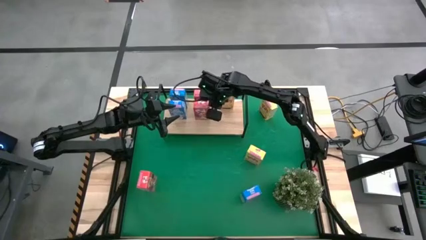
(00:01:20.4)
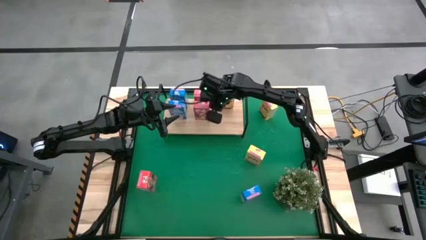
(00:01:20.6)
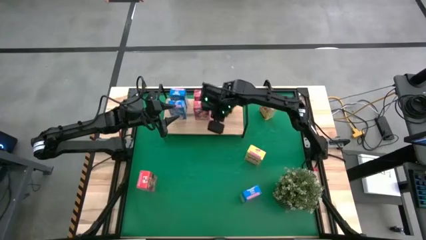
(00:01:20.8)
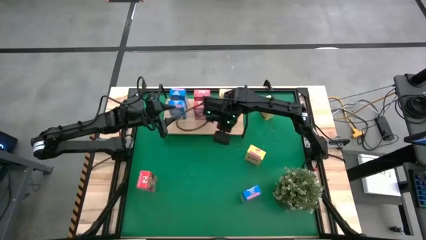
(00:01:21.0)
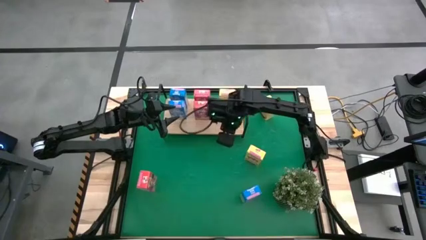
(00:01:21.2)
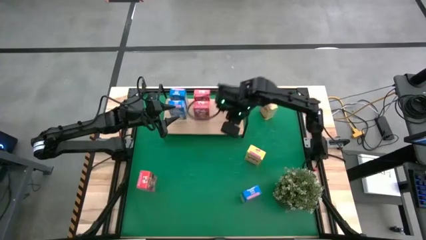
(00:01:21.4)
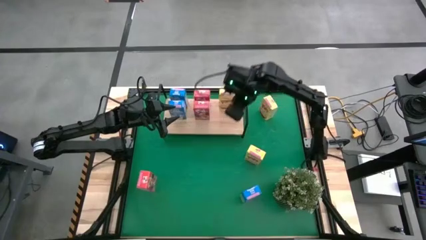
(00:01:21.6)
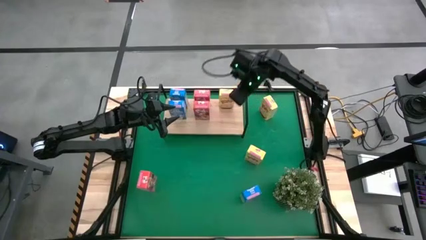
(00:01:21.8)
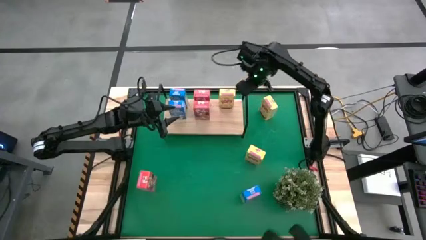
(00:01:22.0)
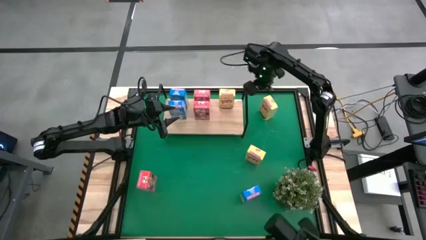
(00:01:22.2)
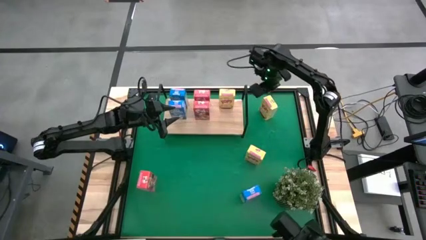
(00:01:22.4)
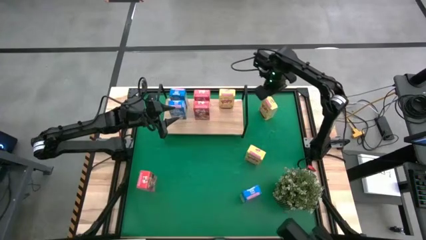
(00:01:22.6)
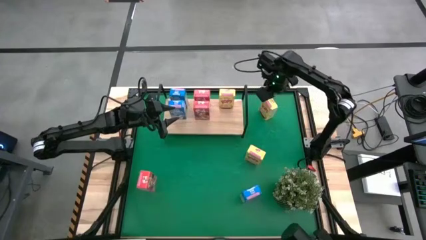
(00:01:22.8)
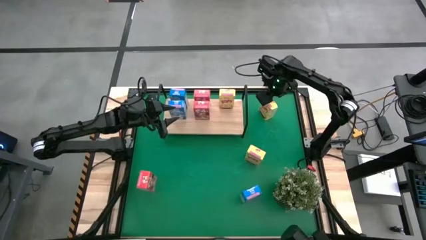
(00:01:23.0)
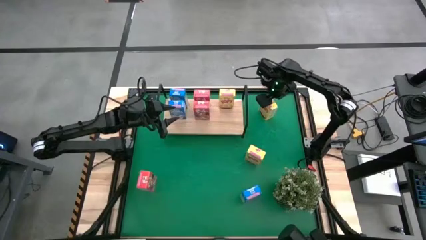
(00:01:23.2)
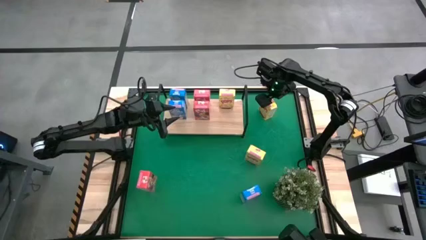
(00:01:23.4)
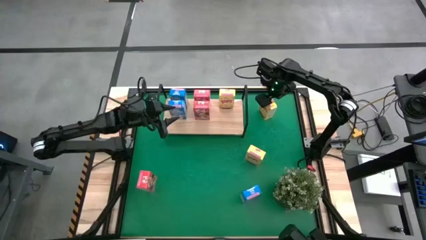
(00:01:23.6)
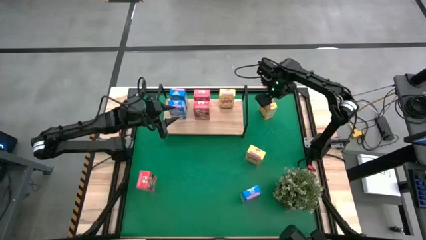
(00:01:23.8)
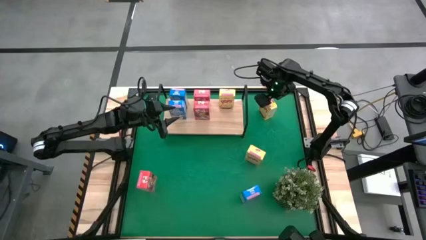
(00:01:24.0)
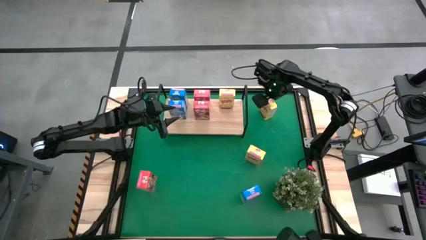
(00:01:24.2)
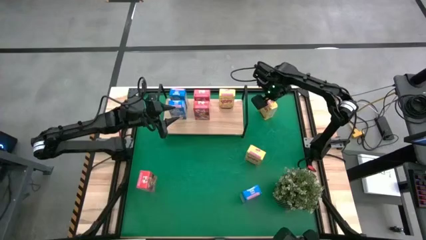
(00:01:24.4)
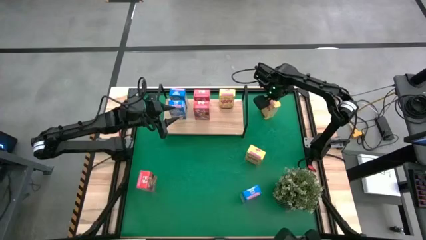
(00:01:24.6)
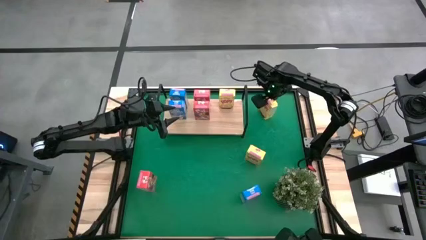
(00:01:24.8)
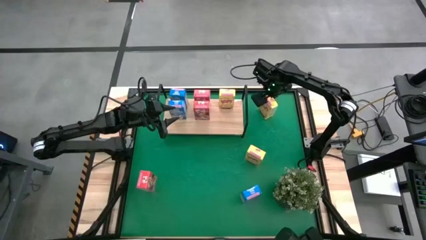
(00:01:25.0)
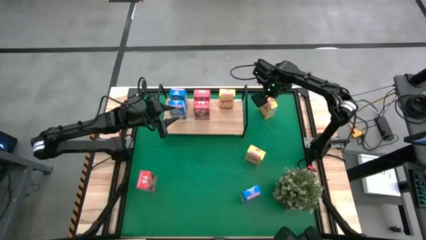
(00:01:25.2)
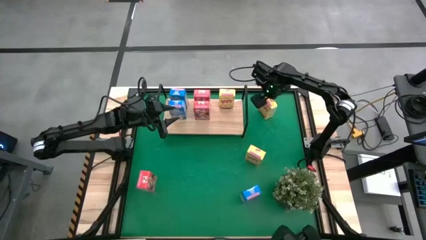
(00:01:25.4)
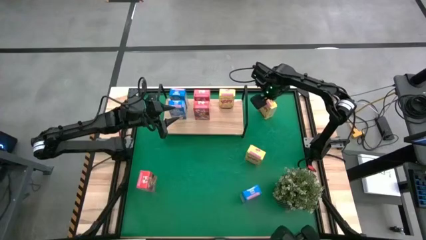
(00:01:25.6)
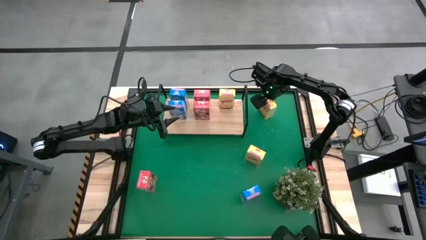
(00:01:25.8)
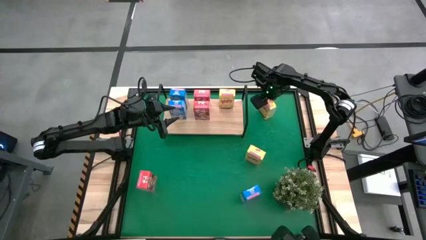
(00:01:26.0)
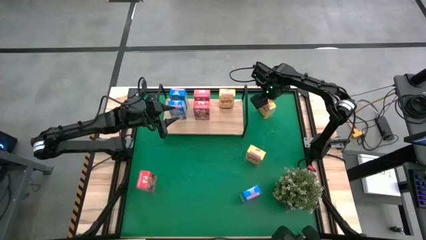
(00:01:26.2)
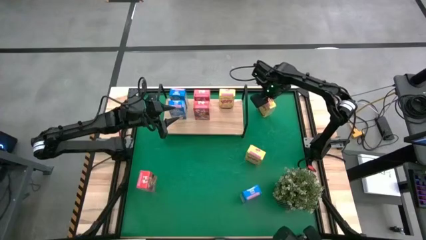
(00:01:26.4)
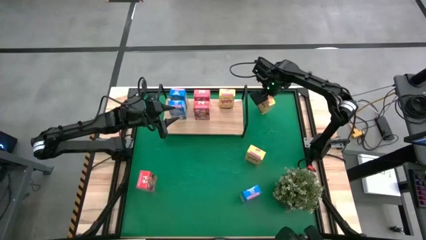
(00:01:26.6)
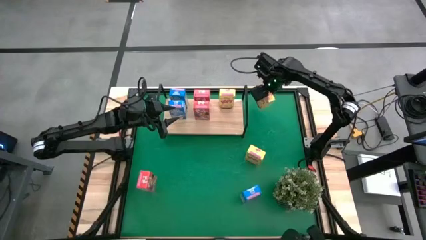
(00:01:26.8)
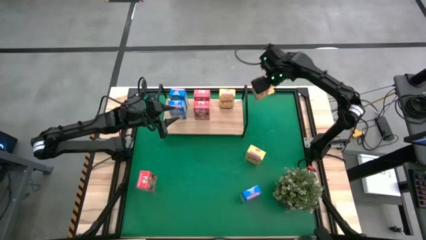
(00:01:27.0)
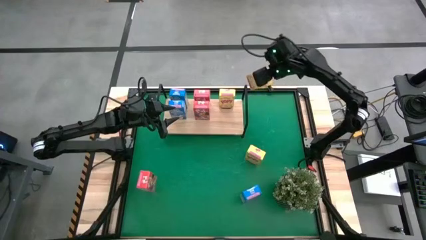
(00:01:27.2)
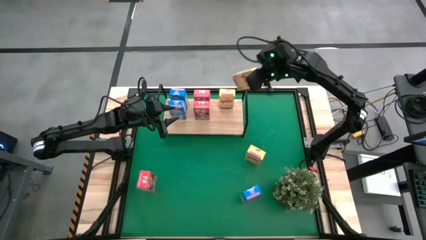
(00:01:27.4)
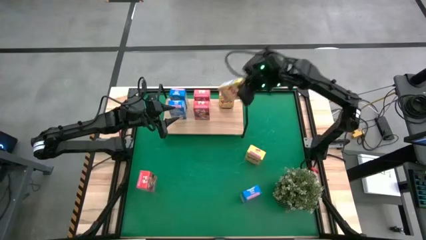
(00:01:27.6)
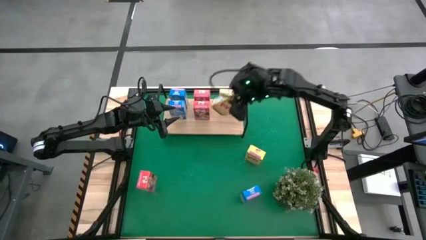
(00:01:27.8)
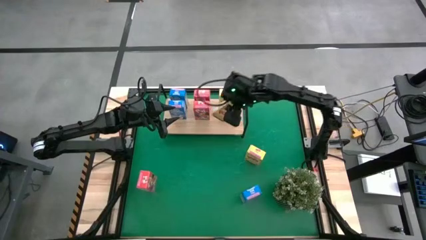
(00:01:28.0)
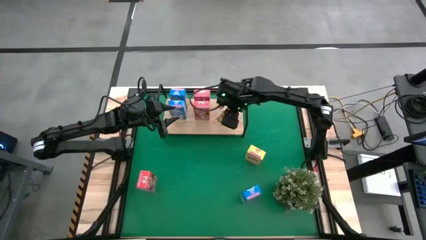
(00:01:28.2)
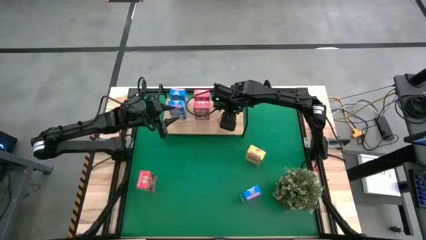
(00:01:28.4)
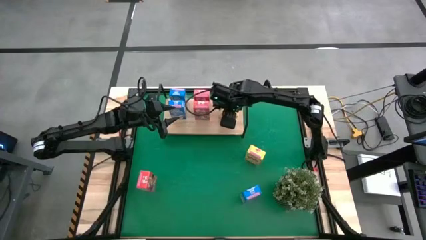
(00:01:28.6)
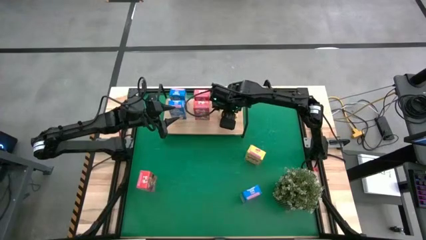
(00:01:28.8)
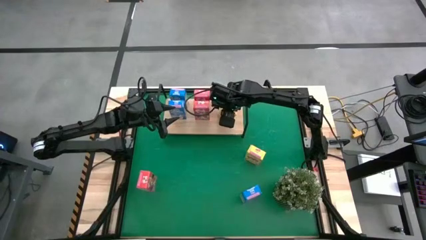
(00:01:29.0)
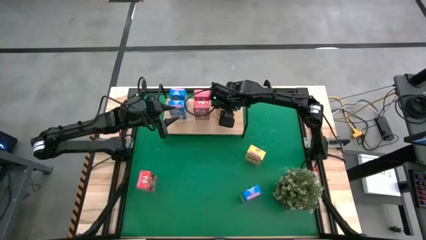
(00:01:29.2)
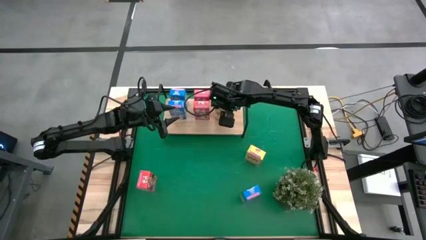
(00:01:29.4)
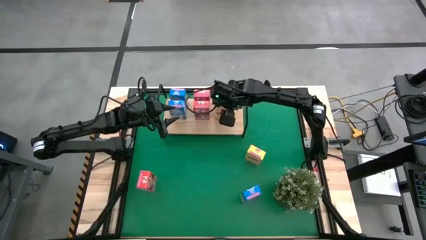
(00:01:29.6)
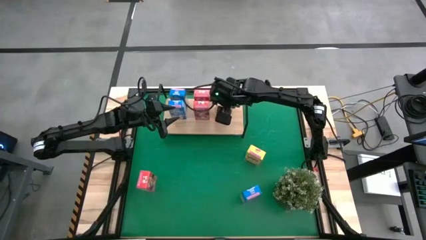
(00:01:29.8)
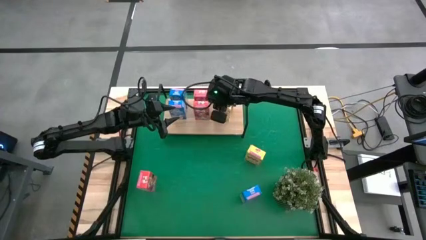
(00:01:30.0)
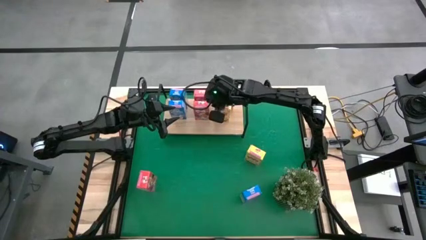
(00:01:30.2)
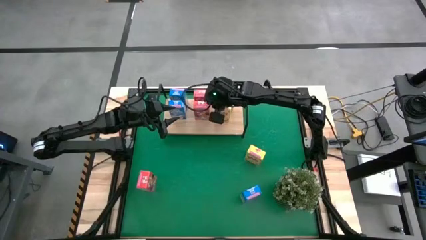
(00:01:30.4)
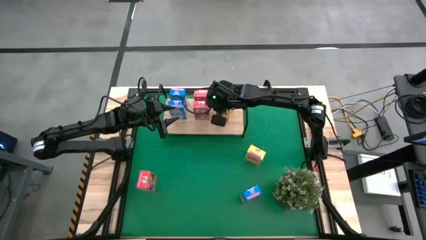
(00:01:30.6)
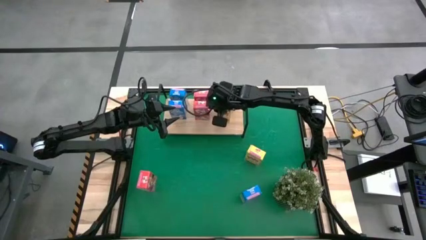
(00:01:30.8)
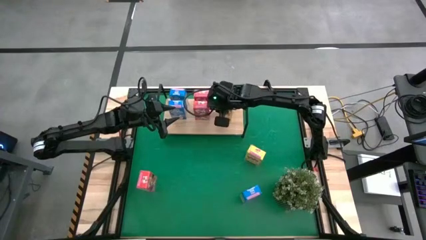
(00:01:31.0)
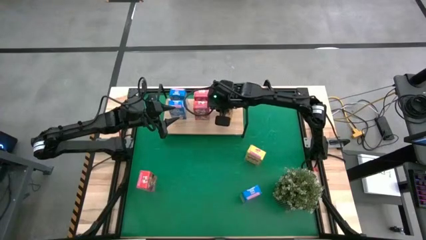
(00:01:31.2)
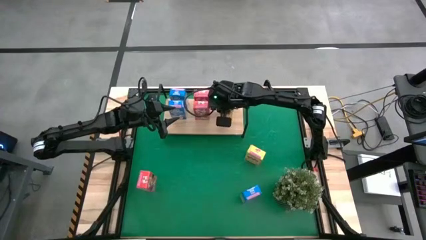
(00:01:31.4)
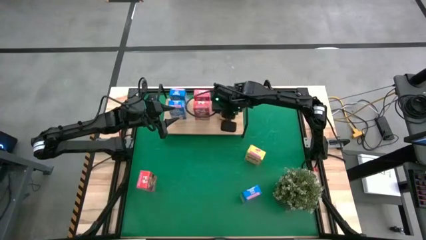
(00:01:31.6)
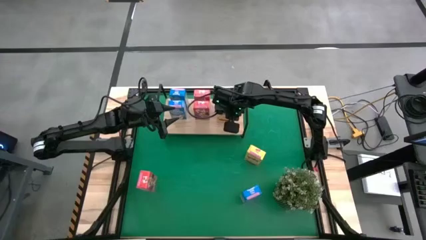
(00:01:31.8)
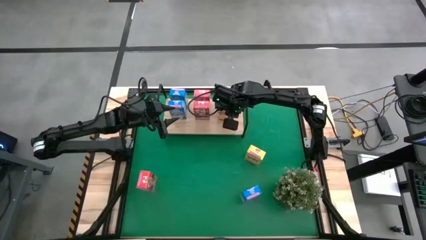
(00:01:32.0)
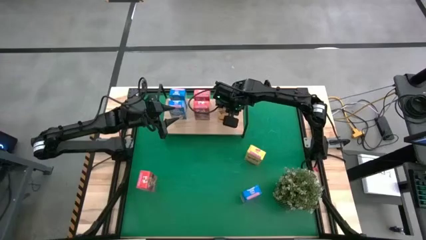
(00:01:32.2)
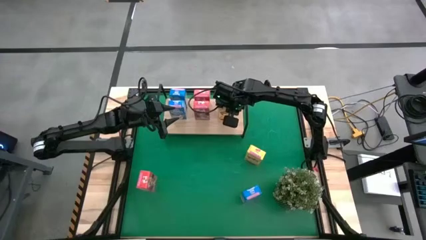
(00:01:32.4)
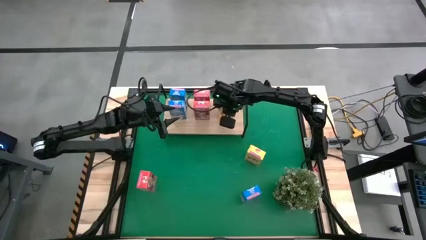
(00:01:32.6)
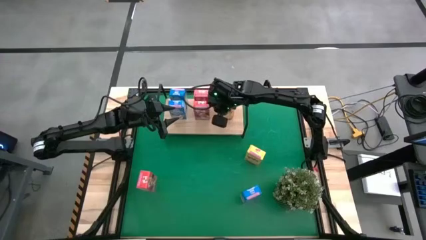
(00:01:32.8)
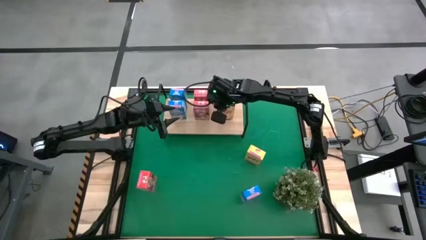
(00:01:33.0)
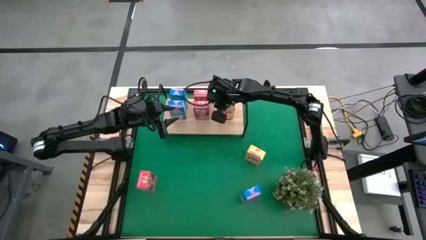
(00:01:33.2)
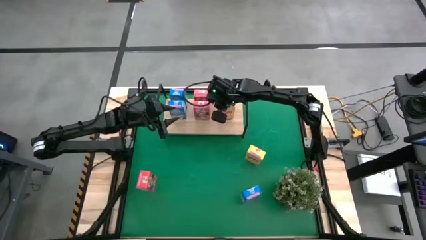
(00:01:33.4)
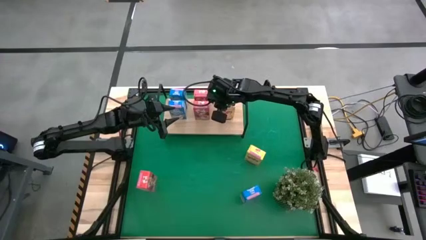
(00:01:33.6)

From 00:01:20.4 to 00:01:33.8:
Task: Stack cereal on shelf
Put the top yellow cereal box on the shelf aligned with the other yellow cereal box

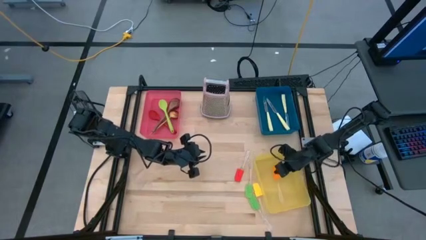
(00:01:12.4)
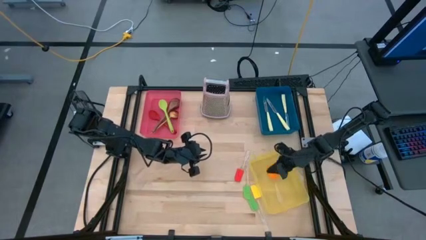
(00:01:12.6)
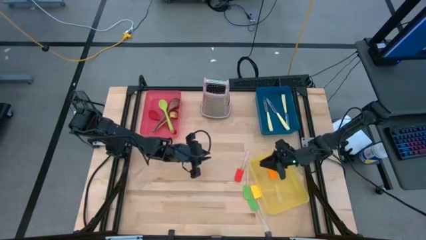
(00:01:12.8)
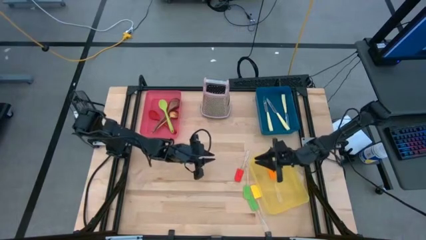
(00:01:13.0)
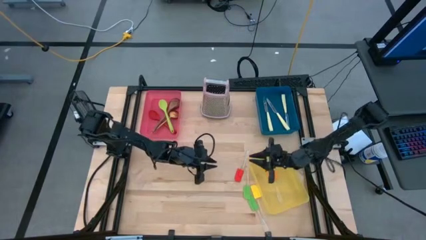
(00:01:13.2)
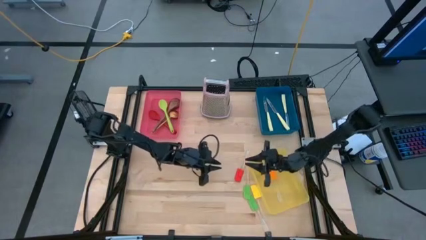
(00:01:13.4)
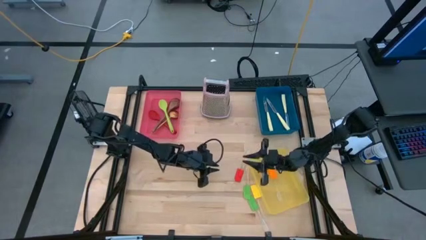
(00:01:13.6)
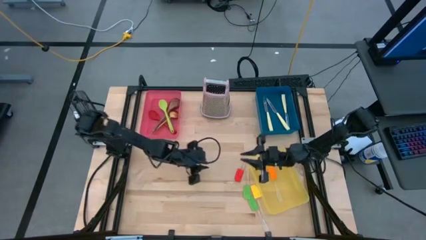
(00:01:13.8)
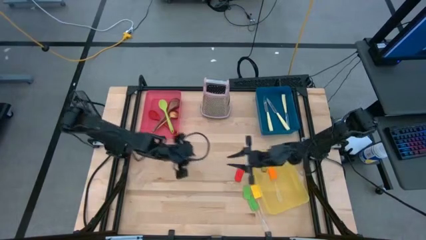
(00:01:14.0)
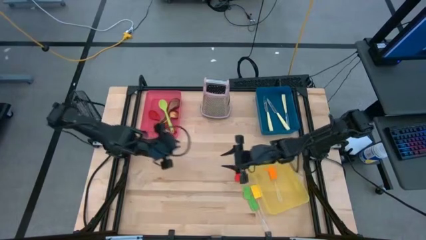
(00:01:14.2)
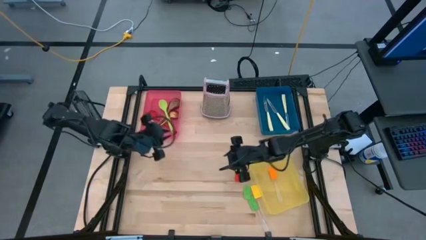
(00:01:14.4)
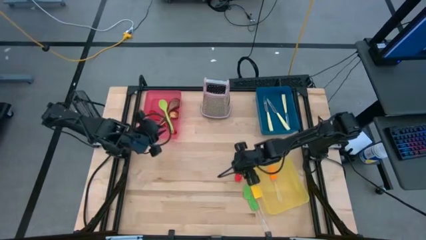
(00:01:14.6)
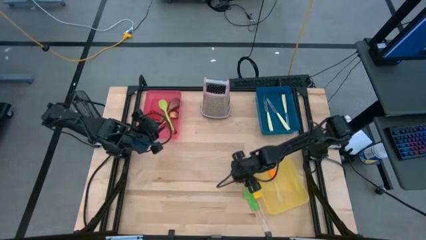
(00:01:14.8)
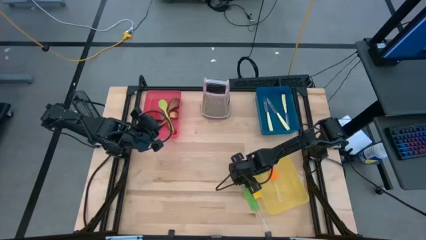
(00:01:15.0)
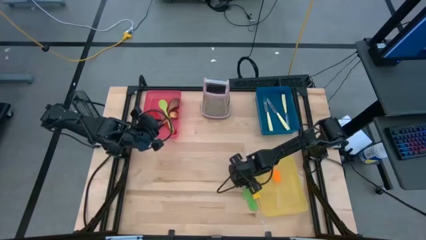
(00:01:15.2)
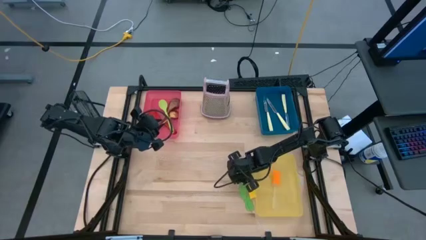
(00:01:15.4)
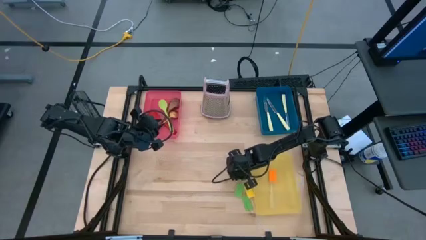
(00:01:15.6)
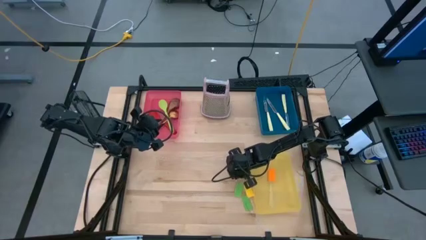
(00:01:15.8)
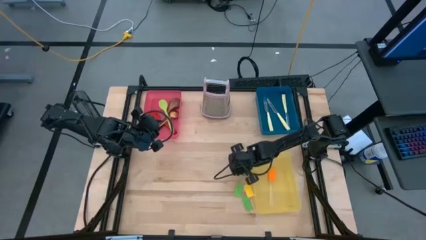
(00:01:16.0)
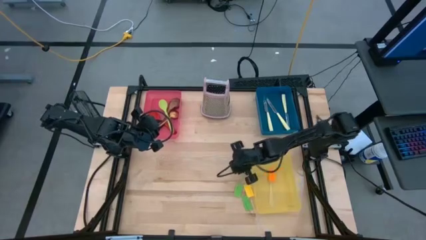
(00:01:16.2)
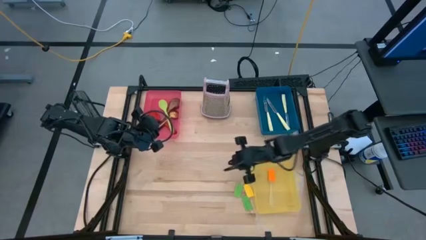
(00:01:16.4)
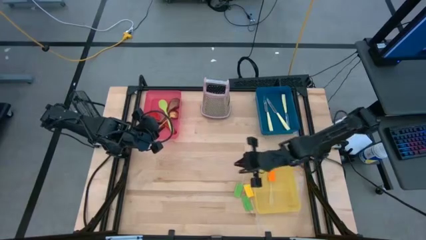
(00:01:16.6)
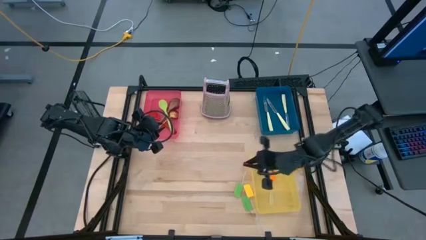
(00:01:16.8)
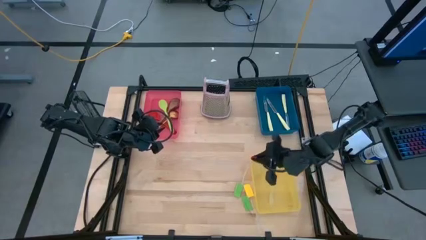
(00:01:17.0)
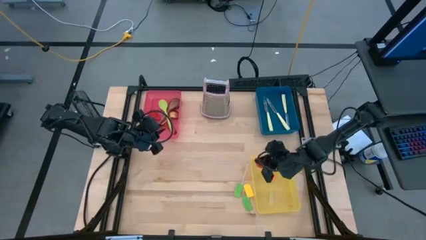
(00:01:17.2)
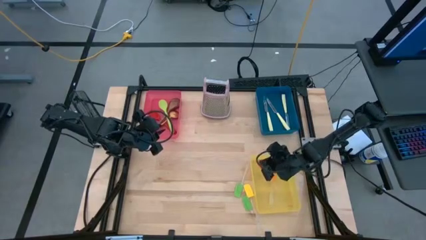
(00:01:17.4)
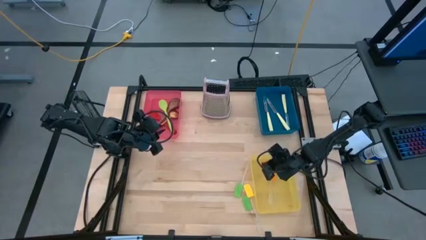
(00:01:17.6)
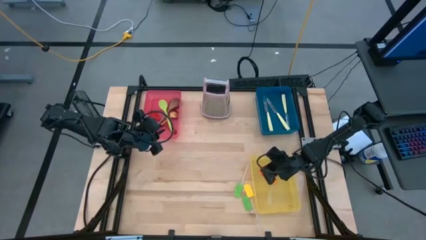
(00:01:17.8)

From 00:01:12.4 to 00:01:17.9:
Task: Pick & Place Kitchen Items
Put the red spatula into the yellow bin
